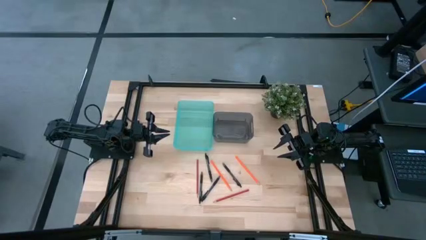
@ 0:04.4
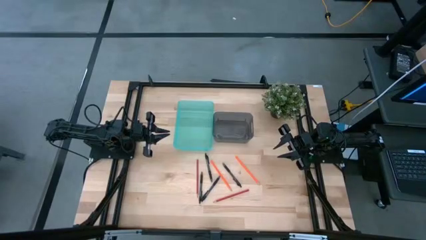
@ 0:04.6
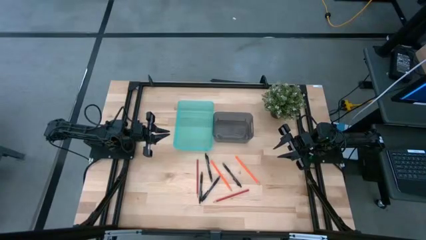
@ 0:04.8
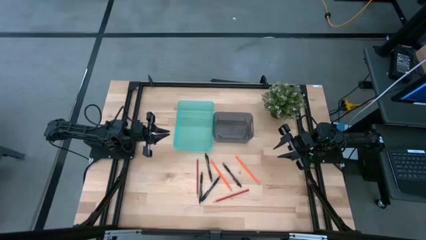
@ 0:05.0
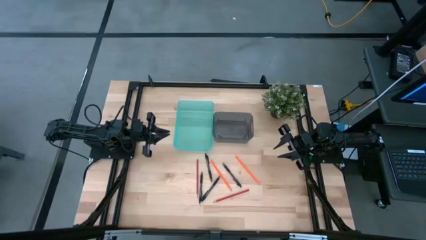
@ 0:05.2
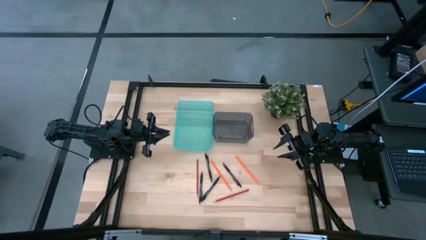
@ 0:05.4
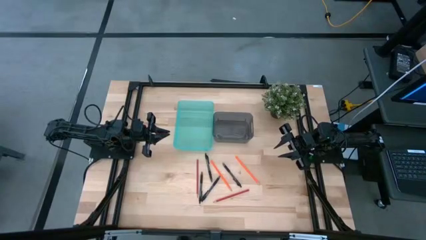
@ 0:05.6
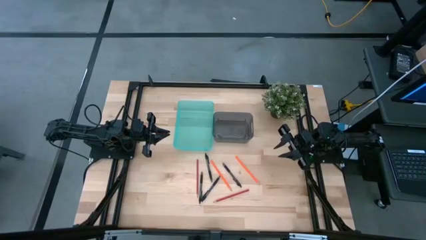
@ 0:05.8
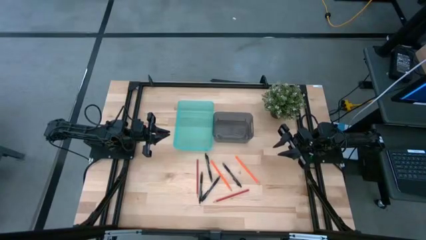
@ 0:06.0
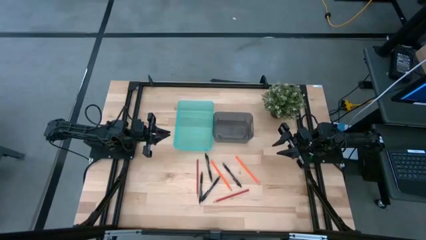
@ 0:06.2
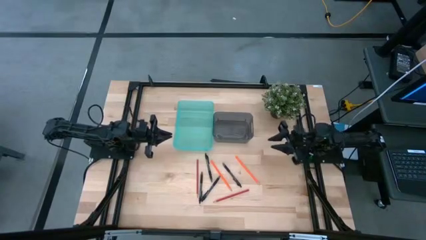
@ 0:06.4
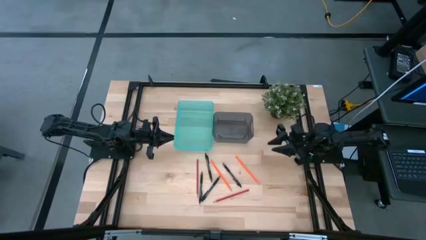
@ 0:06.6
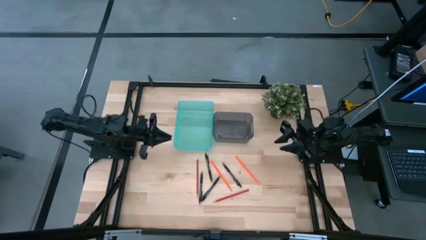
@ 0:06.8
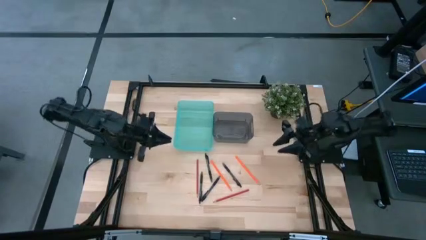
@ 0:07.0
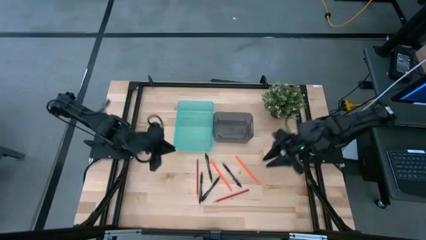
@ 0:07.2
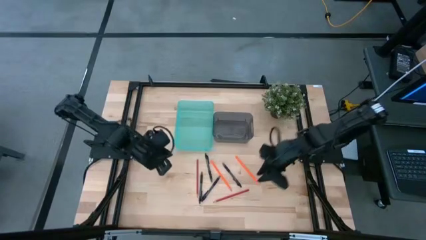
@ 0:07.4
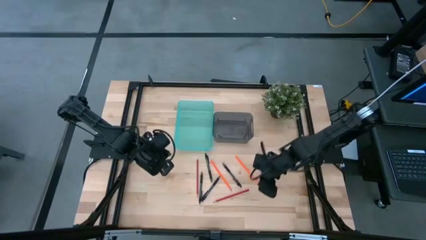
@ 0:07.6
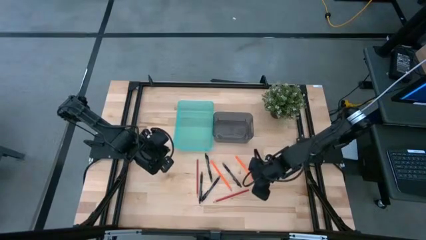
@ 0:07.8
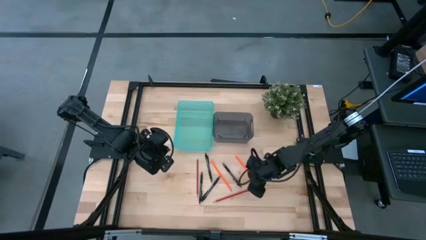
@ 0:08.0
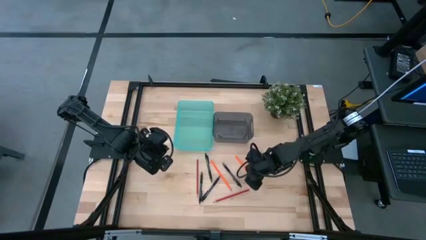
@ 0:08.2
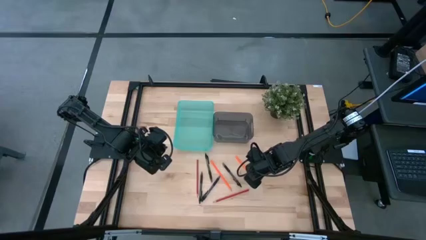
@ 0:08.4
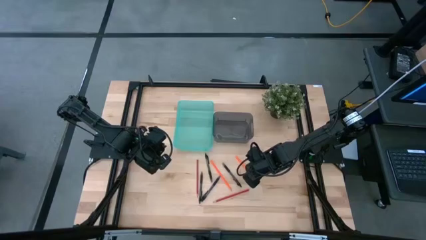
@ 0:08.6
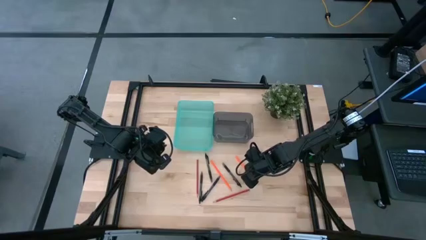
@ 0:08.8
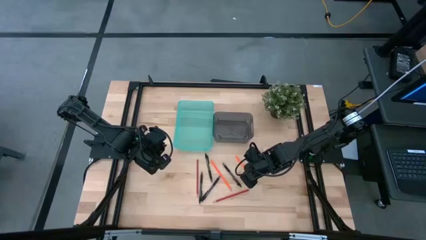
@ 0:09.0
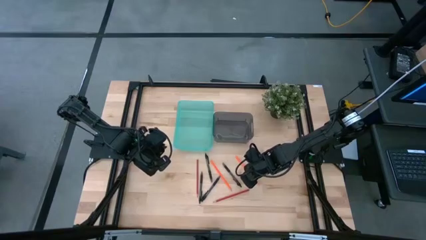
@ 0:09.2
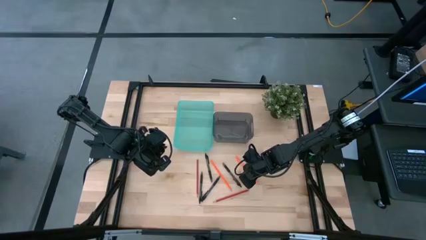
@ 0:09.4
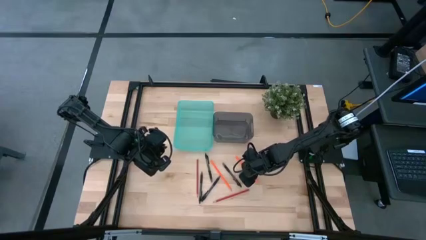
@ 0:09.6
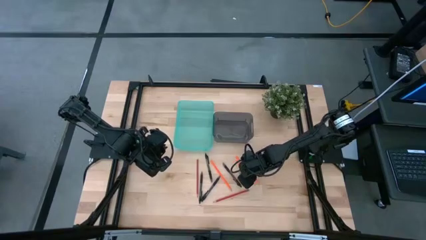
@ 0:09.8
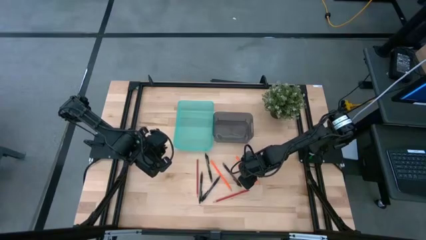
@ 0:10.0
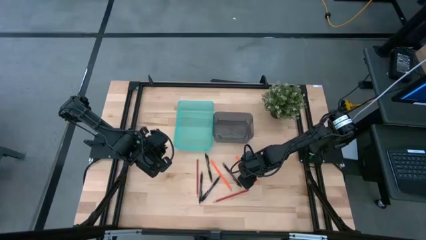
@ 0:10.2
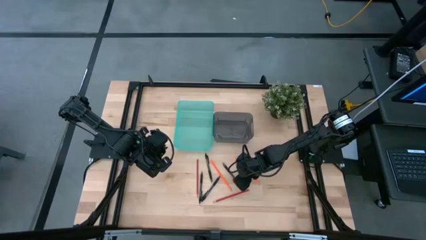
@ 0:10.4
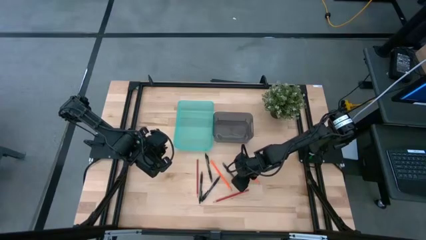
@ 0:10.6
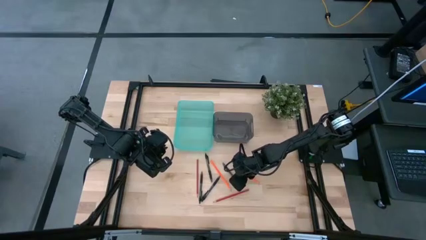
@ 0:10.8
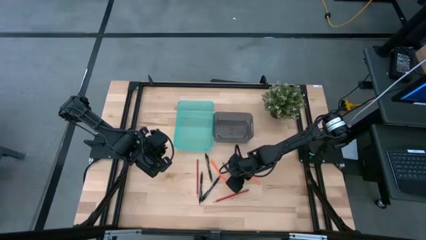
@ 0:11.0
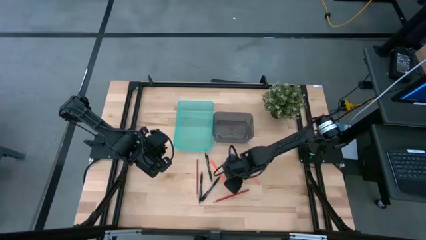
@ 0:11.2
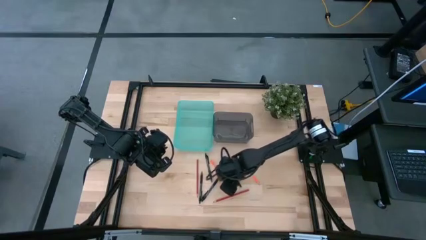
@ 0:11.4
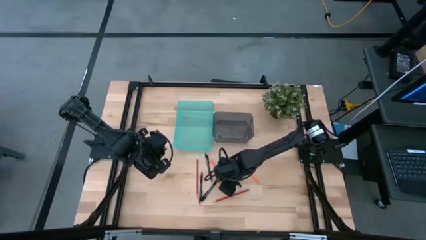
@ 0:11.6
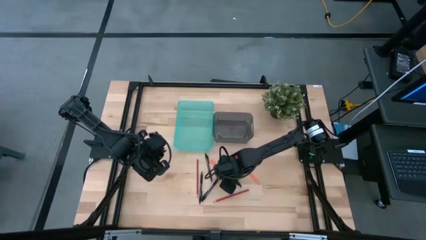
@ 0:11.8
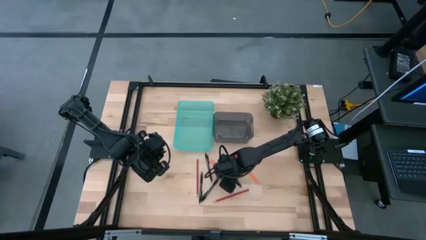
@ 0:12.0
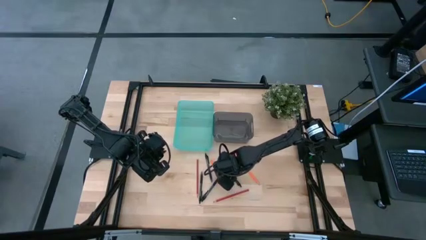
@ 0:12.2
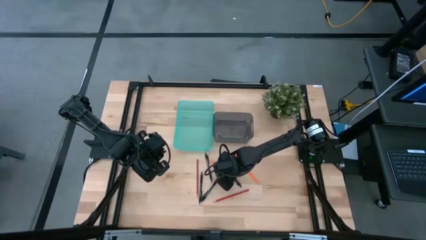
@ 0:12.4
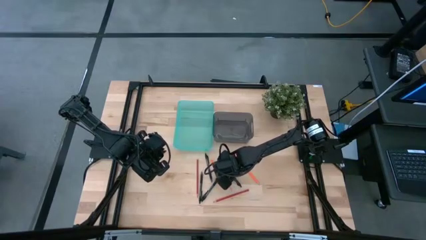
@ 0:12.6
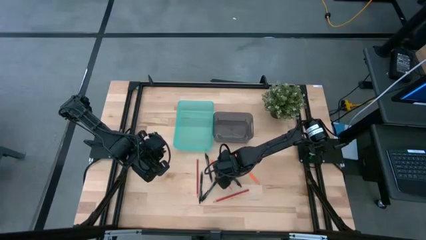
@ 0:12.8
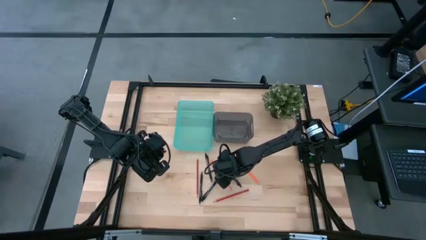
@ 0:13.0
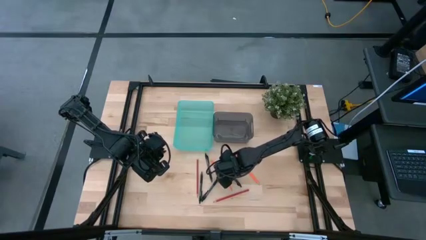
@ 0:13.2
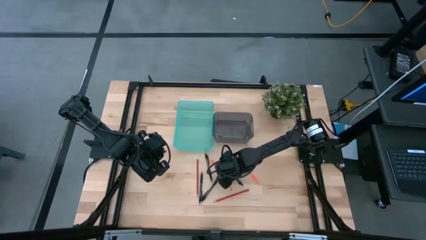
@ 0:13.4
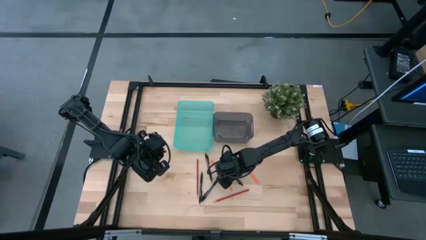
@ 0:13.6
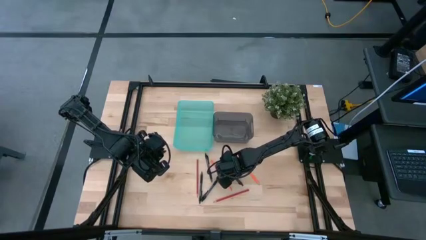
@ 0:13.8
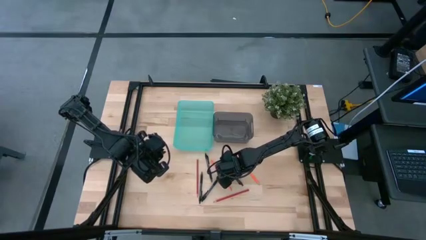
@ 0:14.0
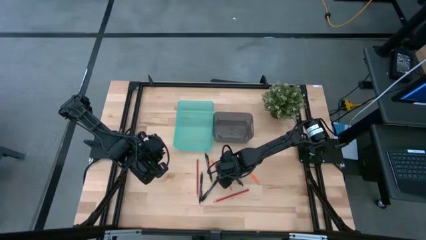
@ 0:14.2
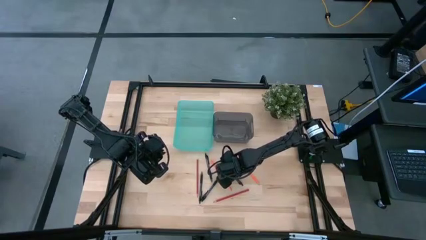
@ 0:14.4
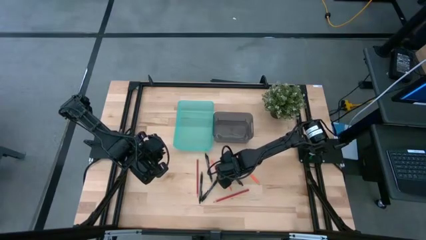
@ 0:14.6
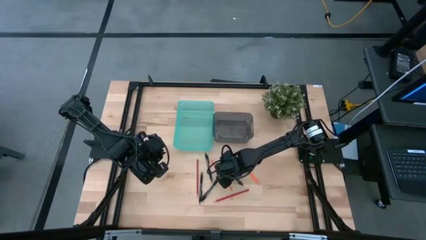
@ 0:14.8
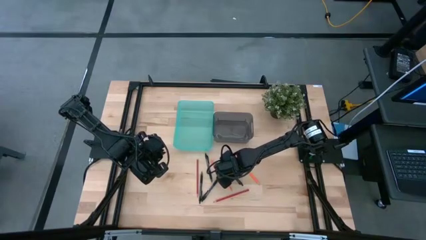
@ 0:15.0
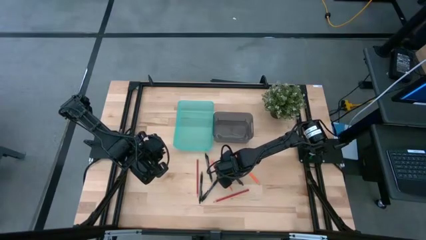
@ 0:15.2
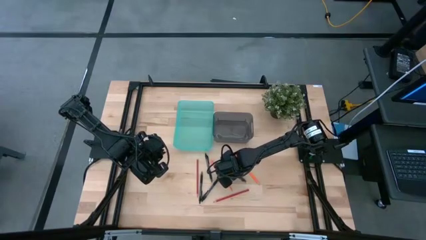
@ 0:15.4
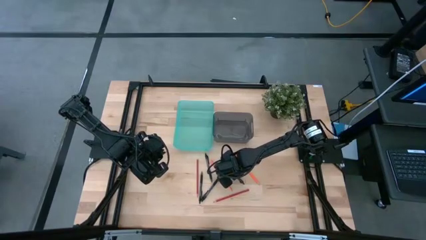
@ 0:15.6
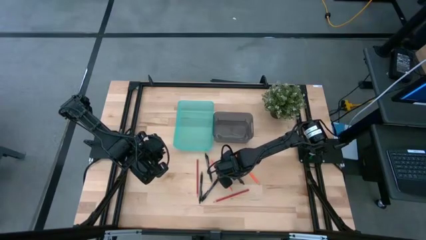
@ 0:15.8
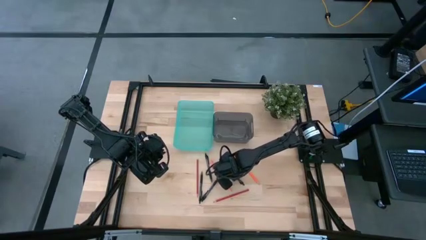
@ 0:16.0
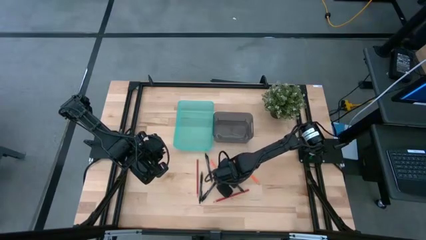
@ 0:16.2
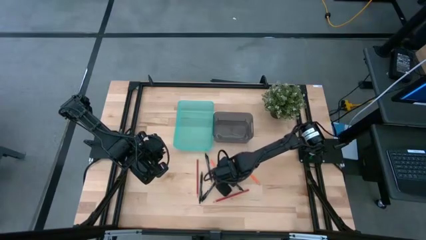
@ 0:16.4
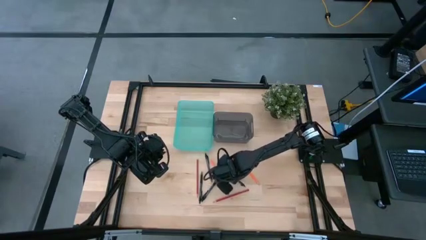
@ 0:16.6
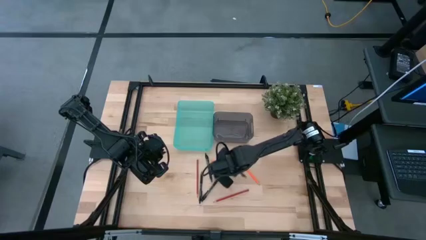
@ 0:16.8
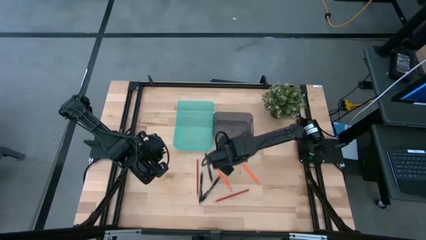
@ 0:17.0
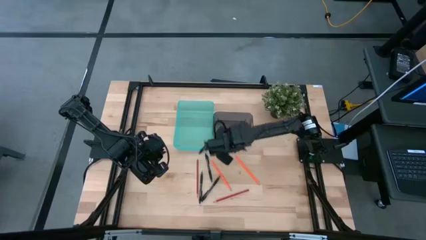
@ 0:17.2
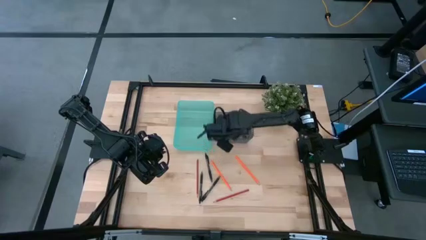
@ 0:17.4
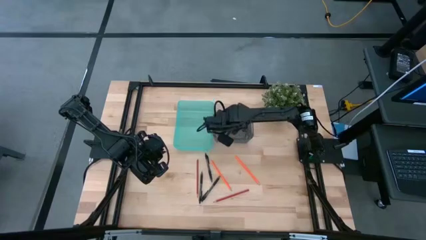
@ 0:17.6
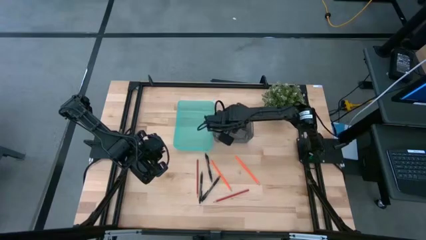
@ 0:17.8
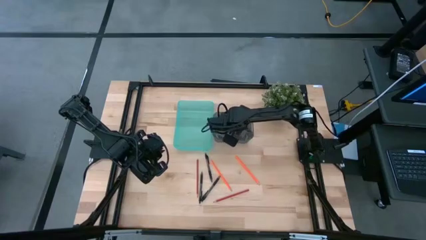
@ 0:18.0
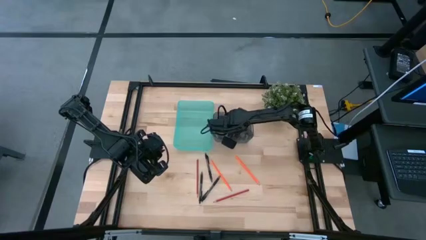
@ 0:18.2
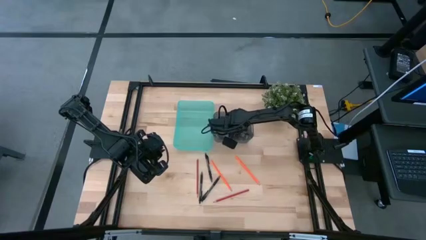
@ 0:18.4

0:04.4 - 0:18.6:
Task: Sort pens & pencils
Put the black pen into the black bin
